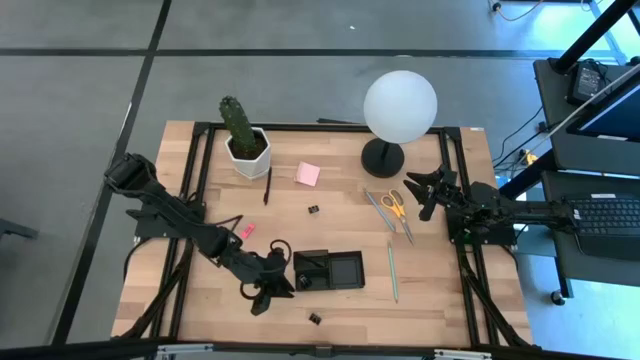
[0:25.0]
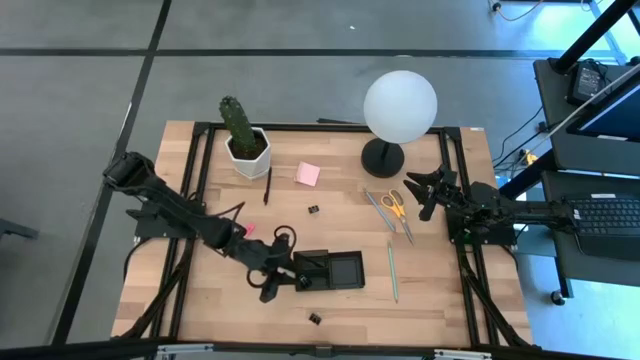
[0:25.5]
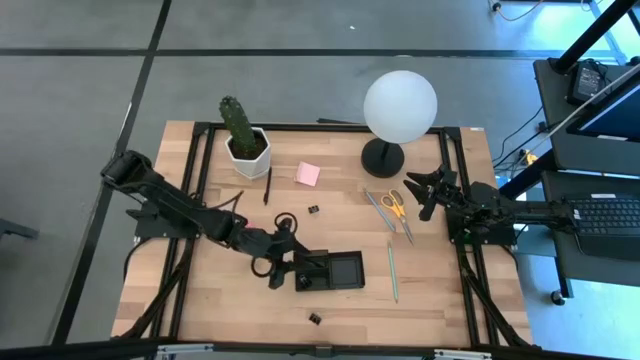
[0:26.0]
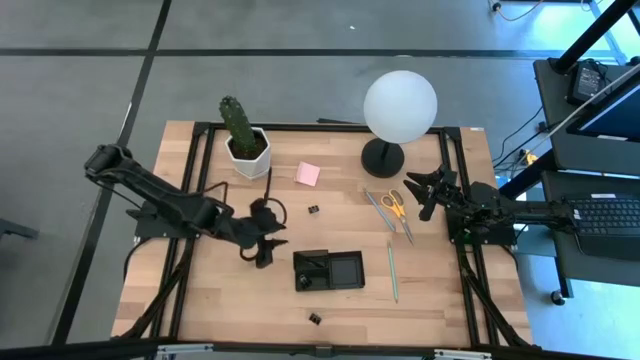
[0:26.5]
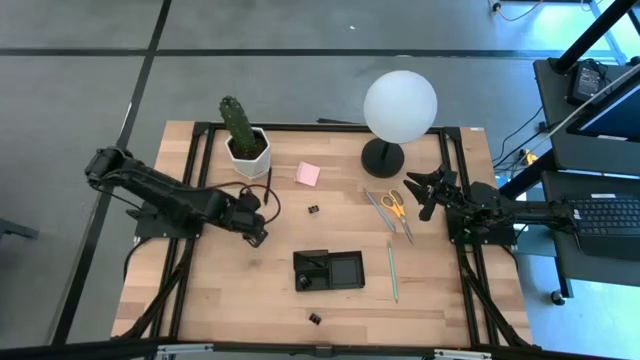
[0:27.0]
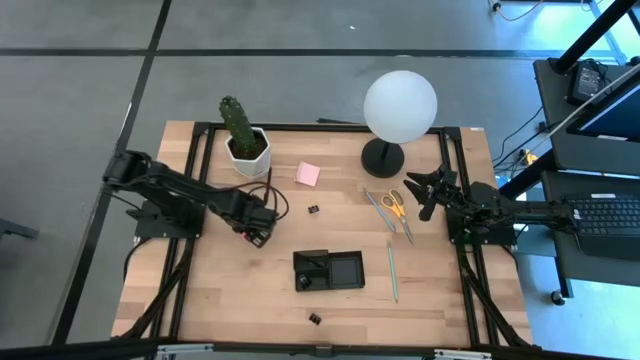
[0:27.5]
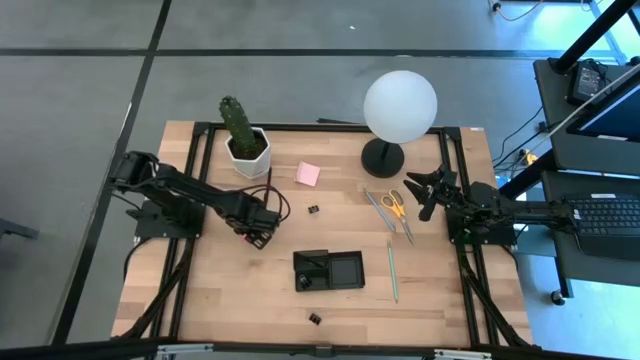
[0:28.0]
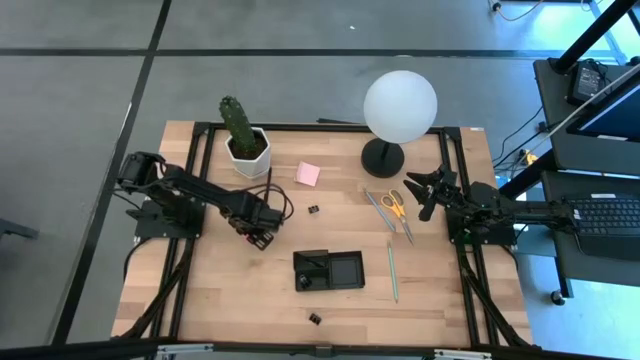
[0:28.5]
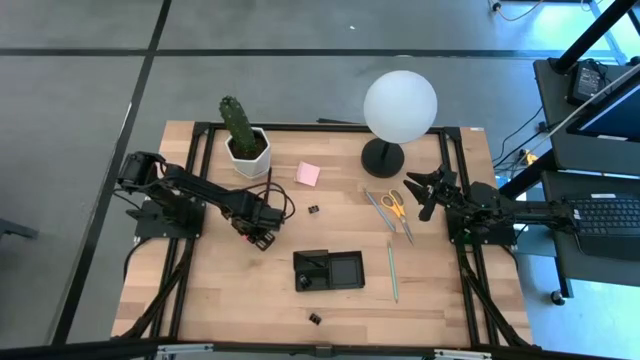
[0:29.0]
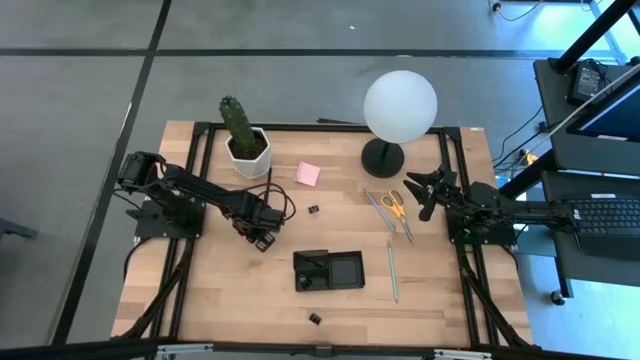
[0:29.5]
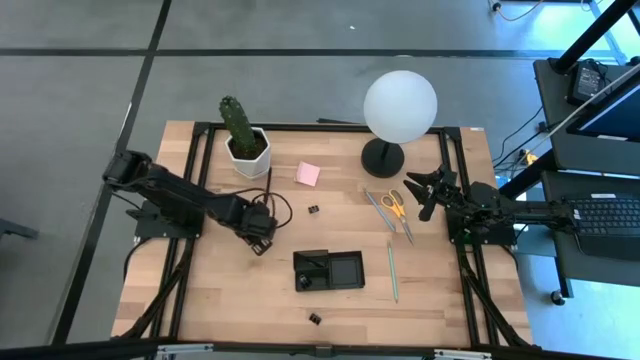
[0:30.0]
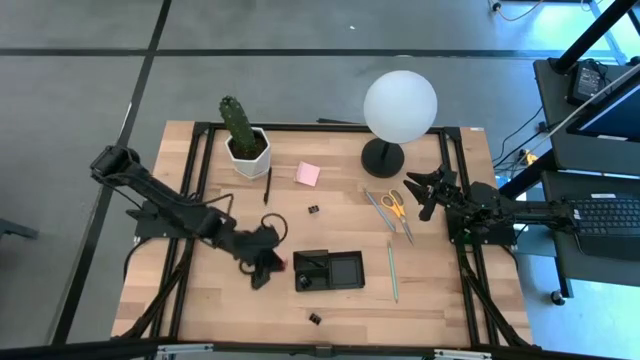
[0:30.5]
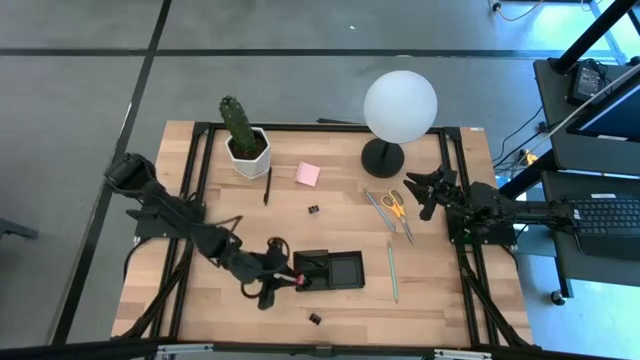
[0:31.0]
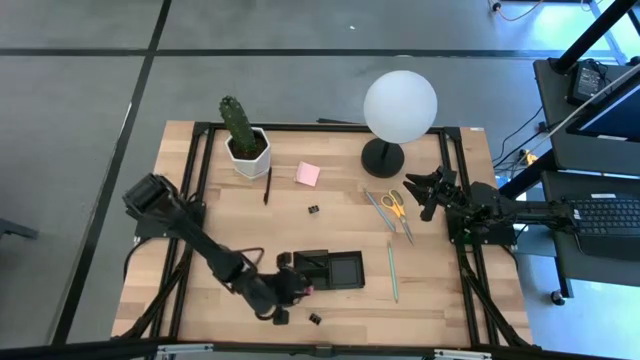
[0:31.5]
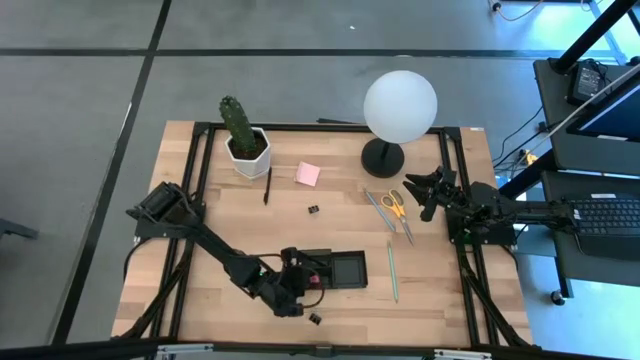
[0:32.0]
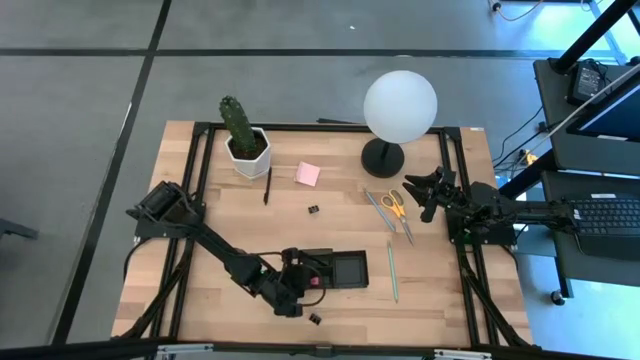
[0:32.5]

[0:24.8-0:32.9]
Task: Pick and place office supplies into organizer
Put the pink eraser into the mesh desk organizer

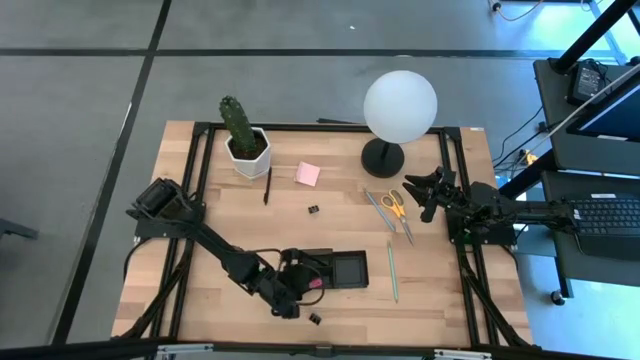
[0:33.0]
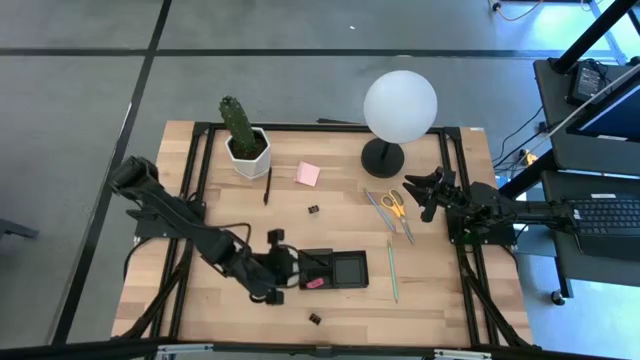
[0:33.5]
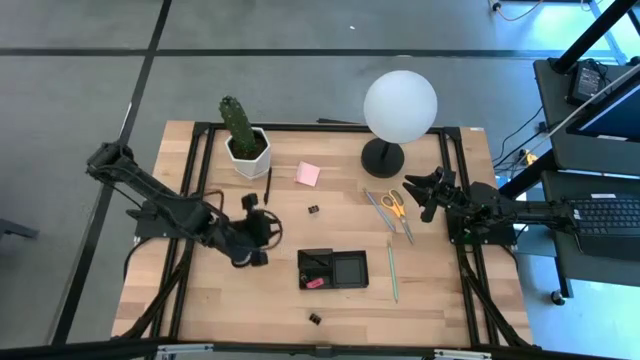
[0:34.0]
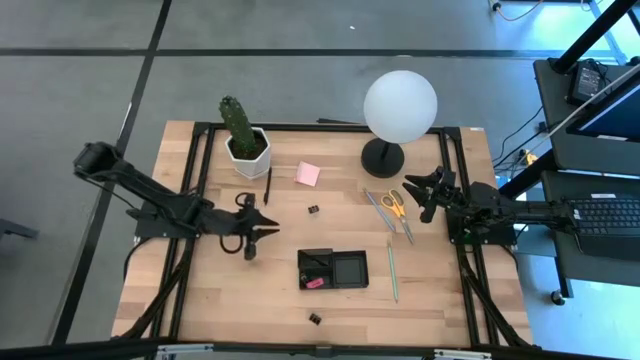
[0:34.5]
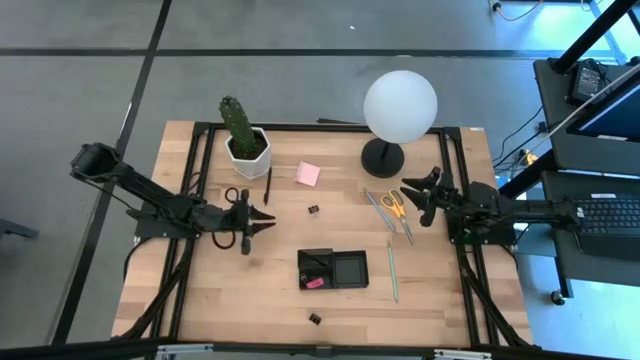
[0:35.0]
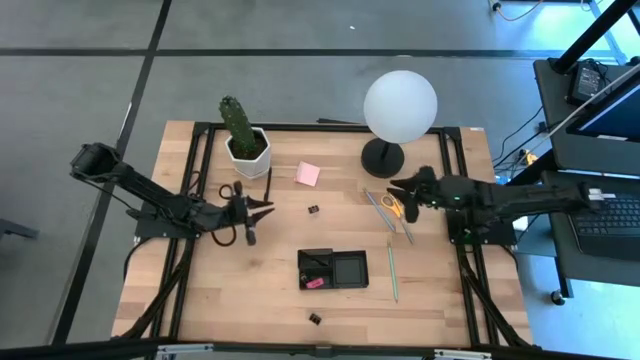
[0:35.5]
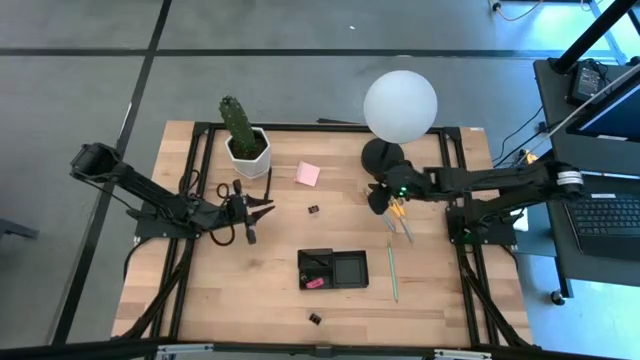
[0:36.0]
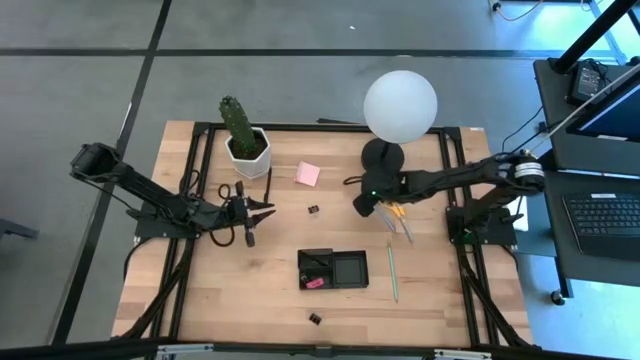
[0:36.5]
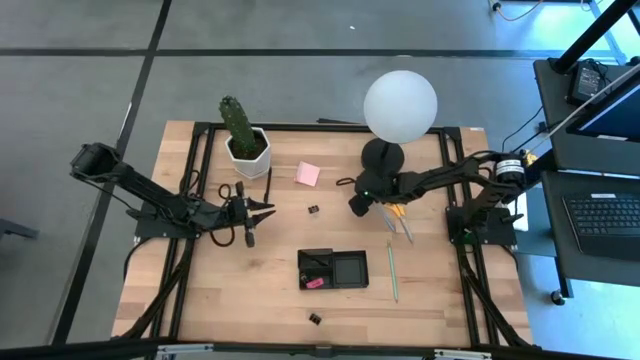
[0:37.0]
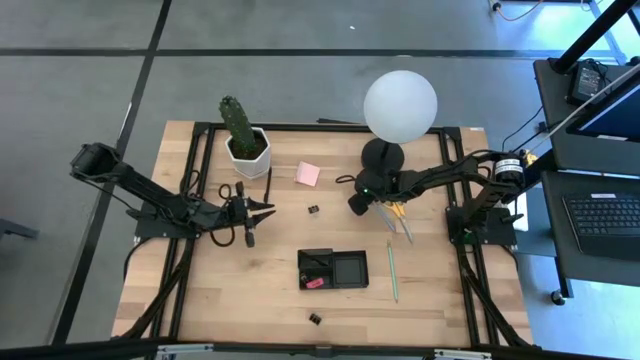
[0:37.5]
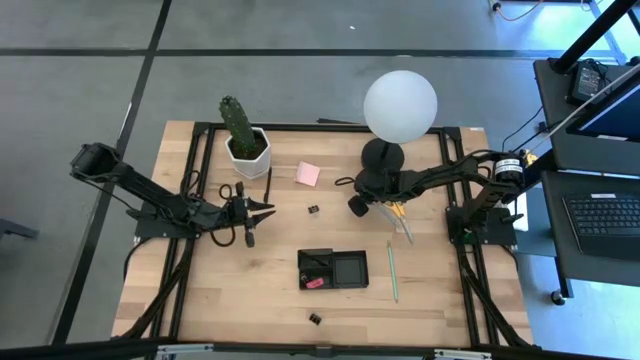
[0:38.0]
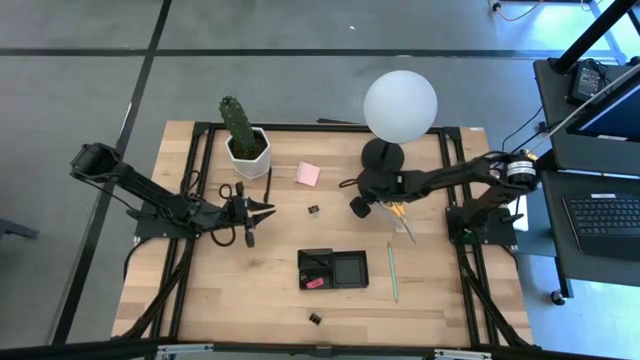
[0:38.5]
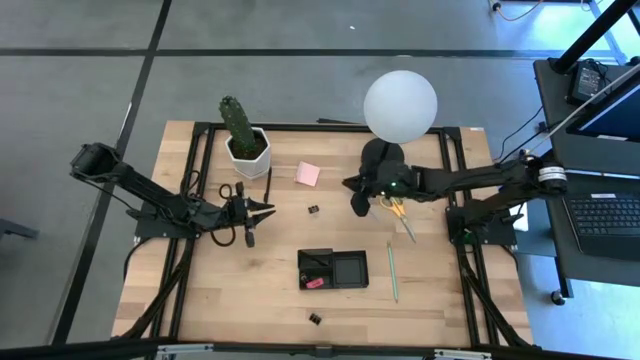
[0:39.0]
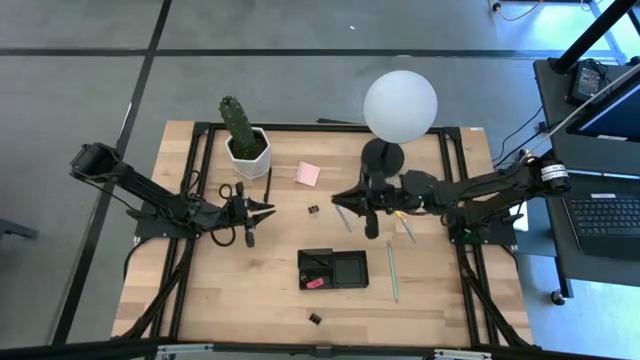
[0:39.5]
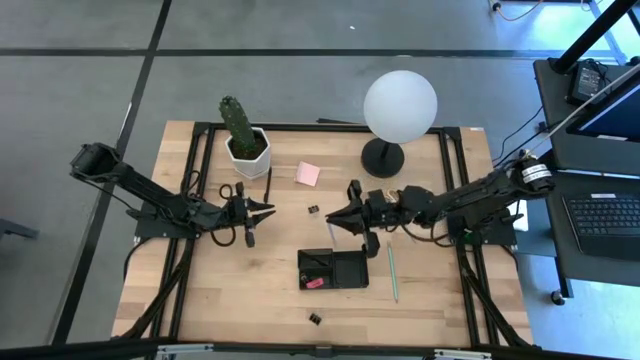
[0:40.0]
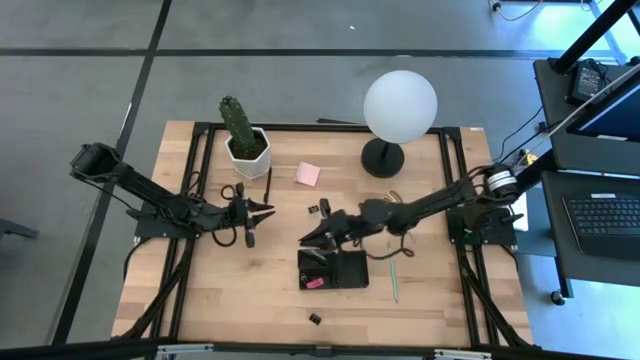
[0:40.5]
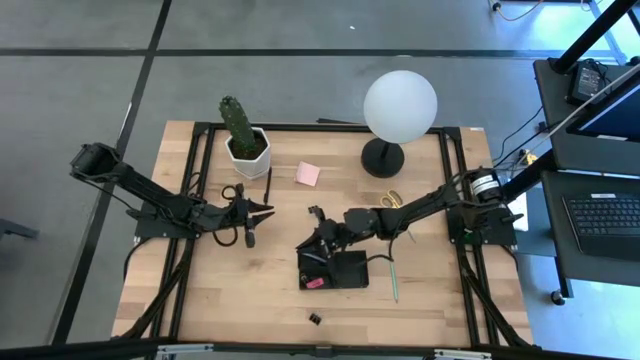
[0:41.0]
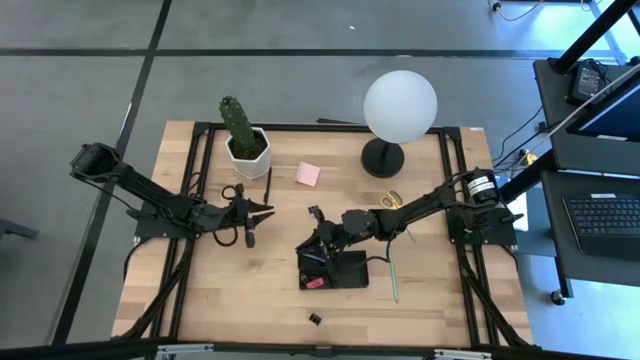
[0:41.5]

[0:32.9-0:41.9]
Put the blue pencil into the mesh desk organizer

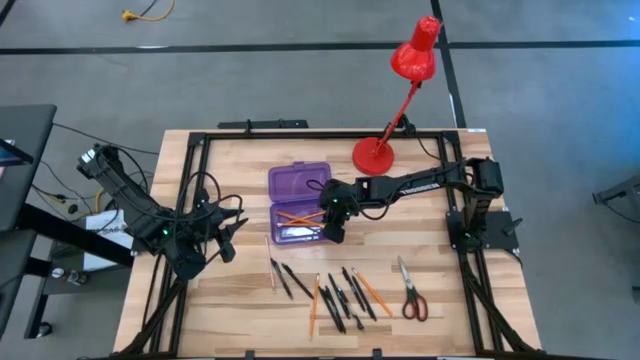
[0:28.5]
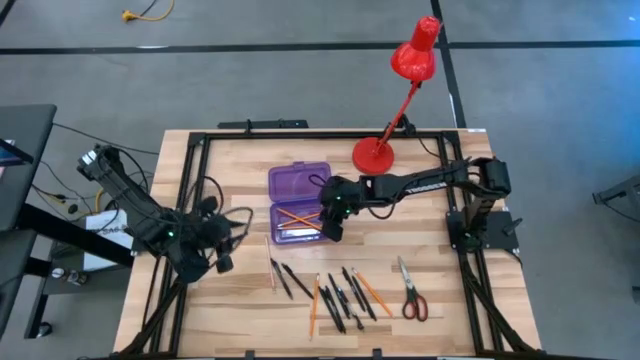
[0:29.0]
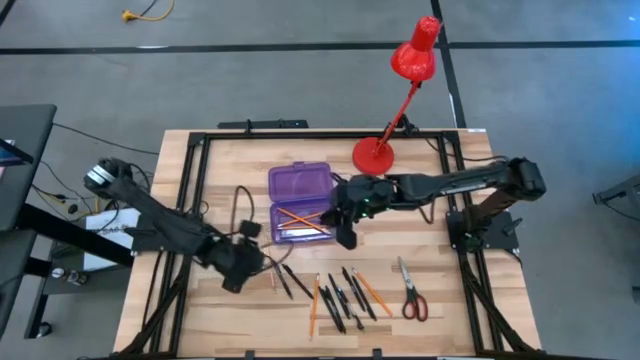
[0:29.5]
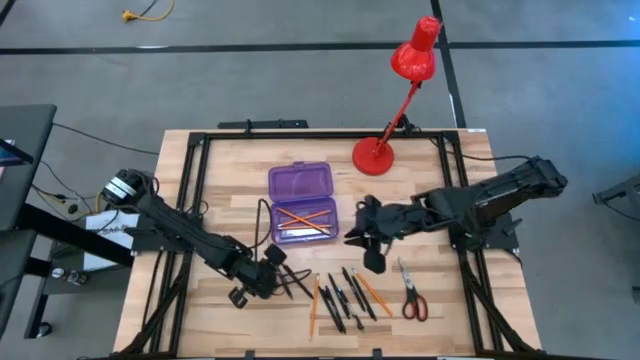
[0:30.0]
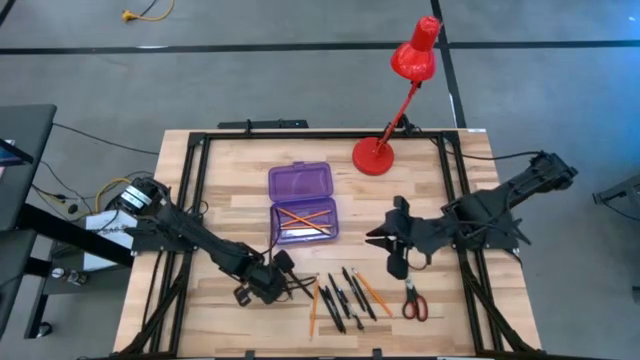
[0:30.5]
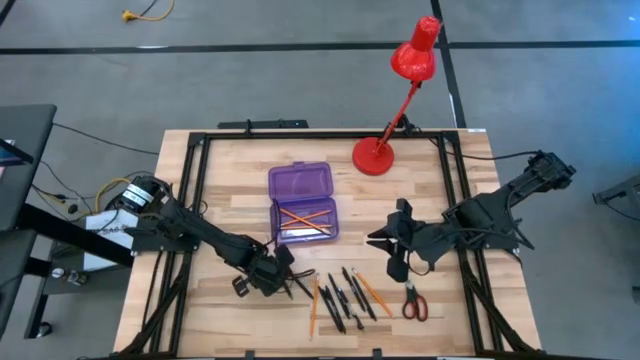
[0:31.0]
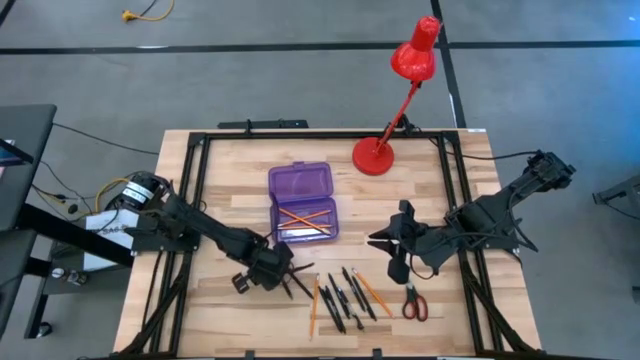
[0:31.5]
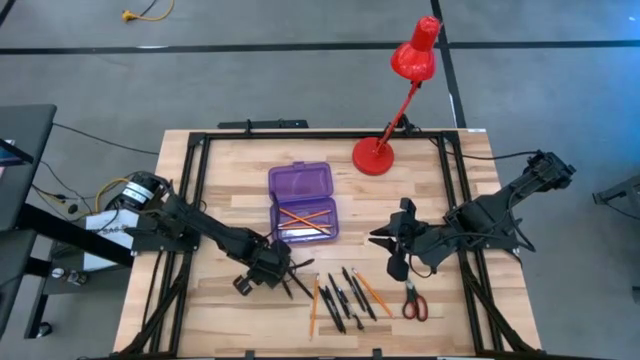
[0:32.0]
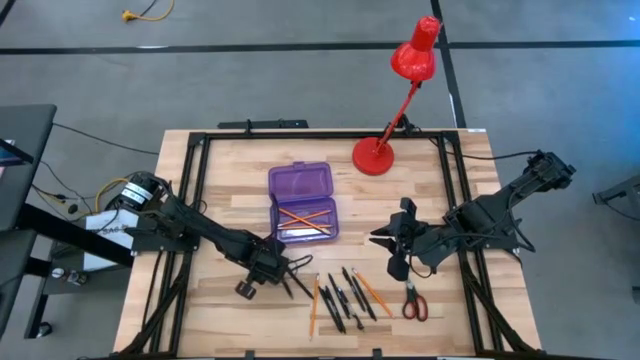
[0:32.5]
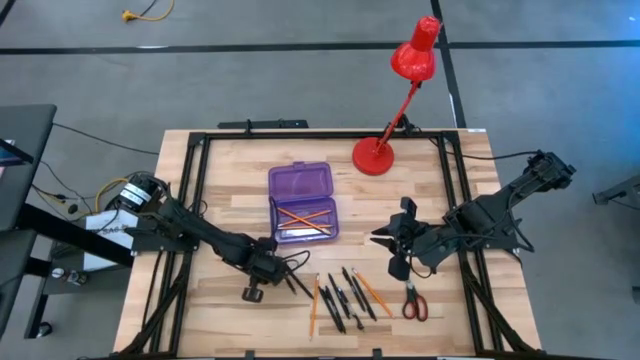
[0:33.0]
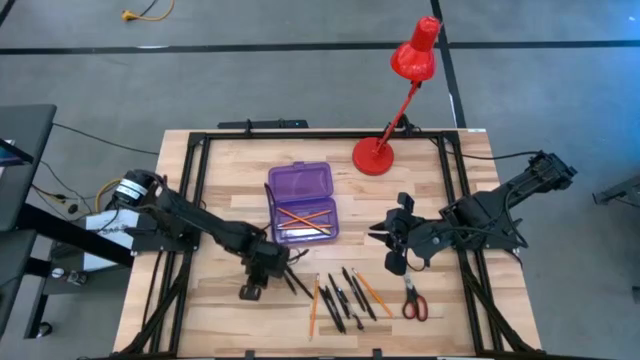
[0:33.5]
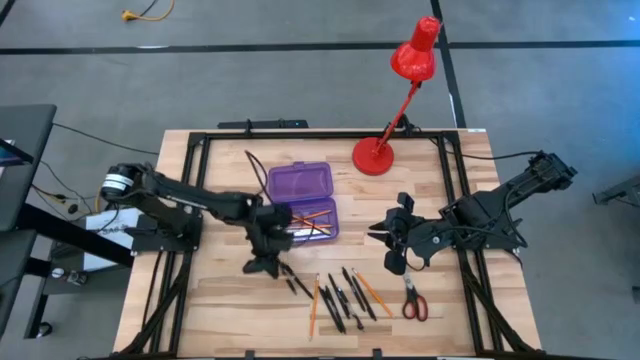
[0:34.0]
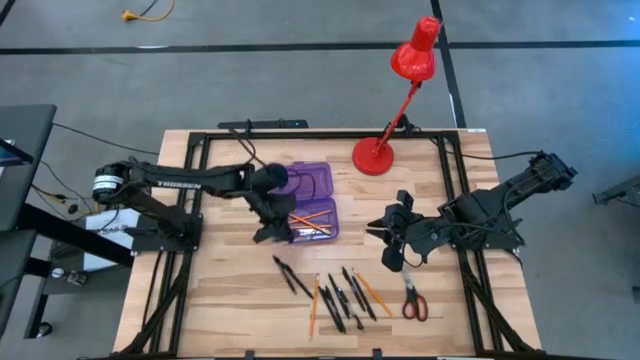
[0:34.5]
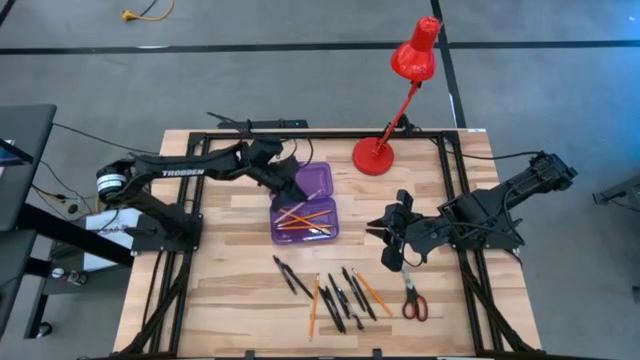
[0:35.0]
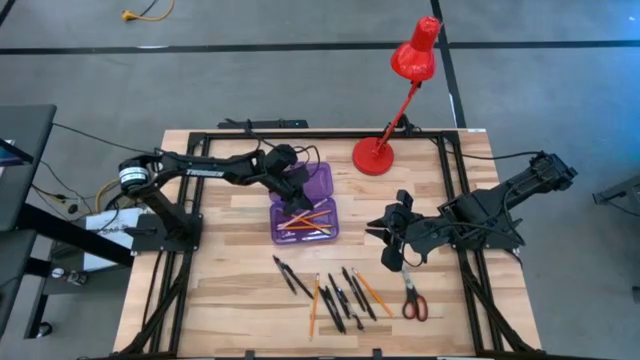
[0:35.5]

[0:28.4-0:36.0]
Task: Pick & place school supplies into a supply box
Put the brown pencil into the purple supply box
